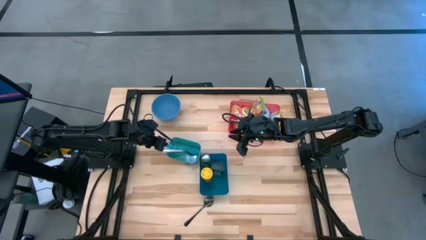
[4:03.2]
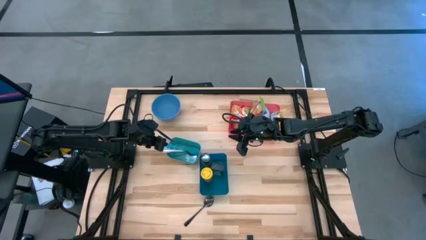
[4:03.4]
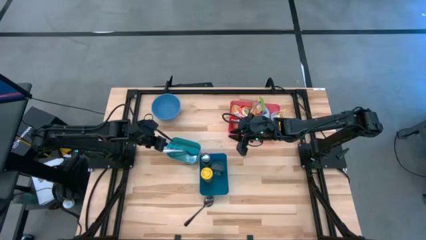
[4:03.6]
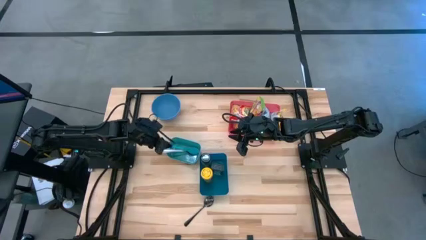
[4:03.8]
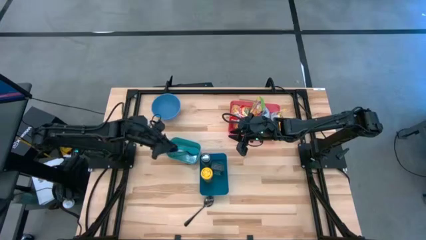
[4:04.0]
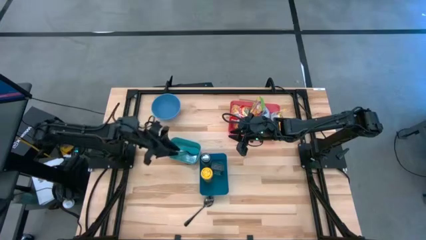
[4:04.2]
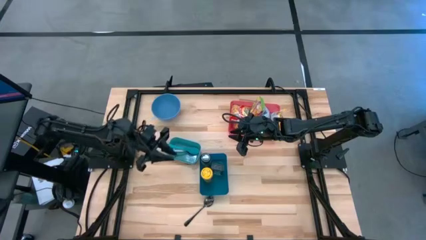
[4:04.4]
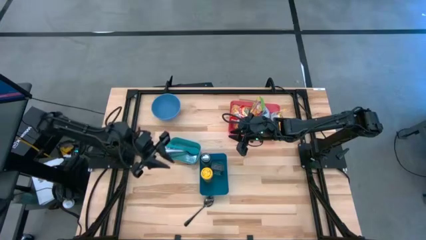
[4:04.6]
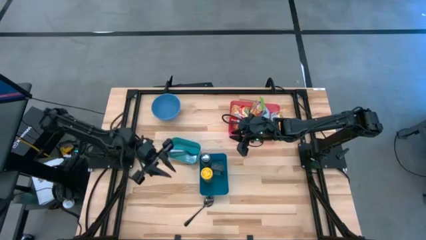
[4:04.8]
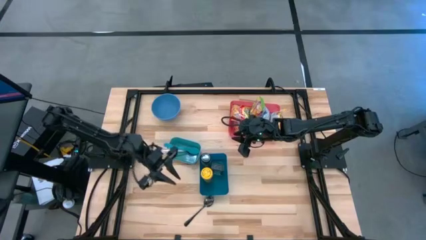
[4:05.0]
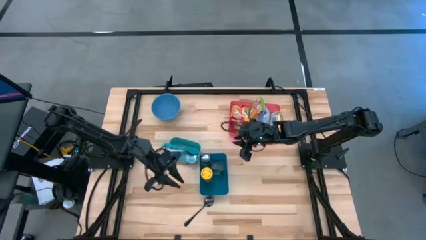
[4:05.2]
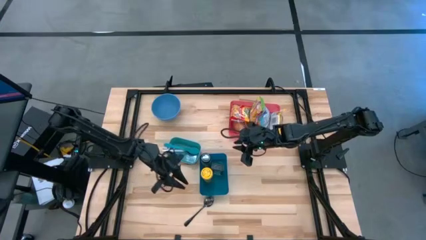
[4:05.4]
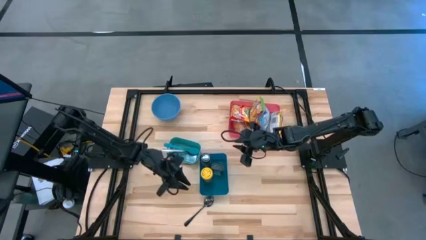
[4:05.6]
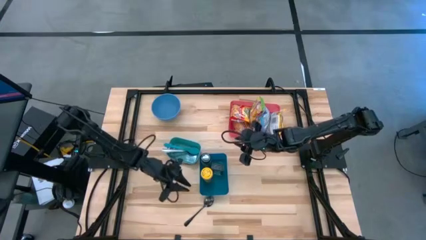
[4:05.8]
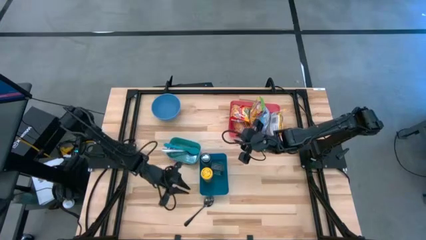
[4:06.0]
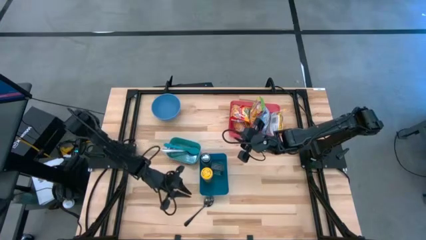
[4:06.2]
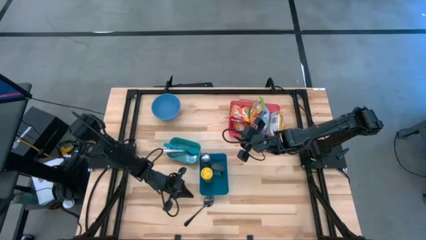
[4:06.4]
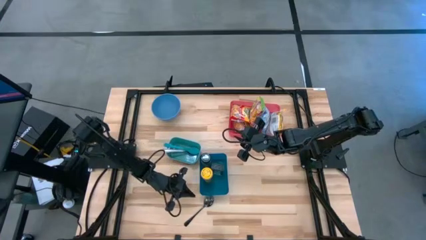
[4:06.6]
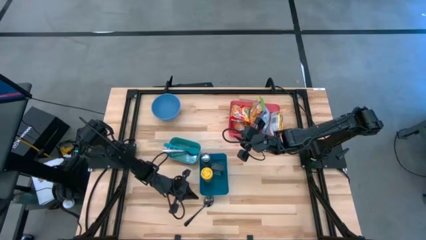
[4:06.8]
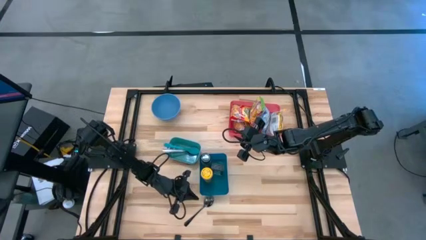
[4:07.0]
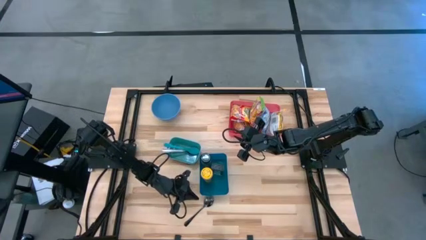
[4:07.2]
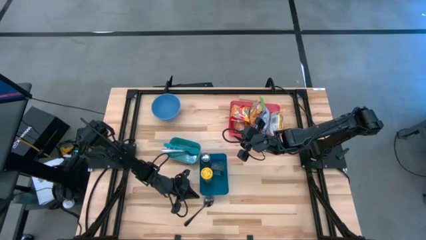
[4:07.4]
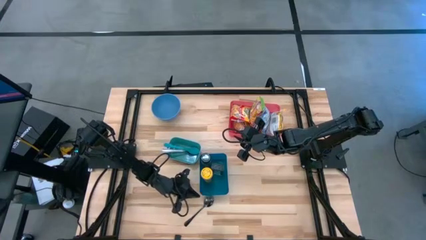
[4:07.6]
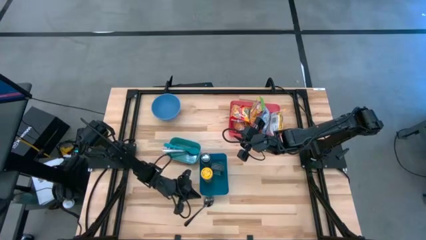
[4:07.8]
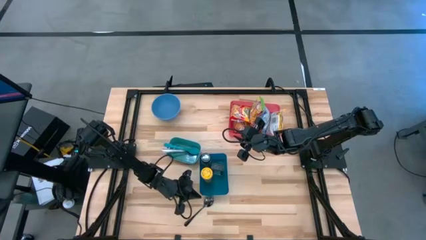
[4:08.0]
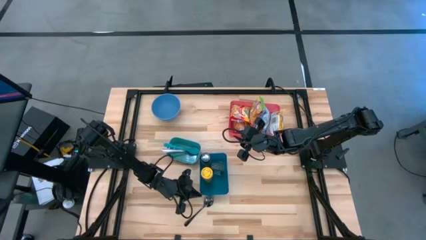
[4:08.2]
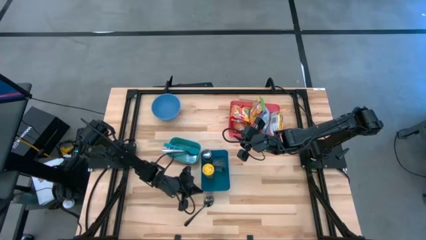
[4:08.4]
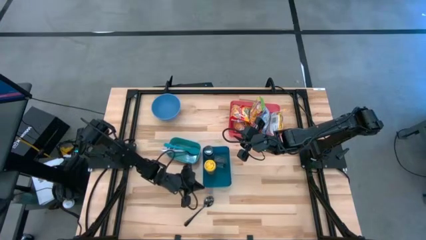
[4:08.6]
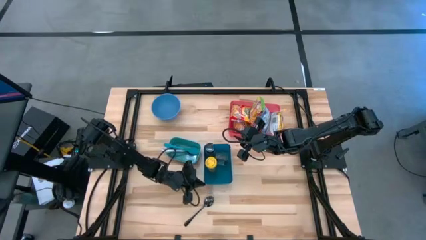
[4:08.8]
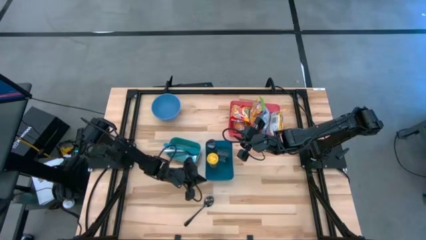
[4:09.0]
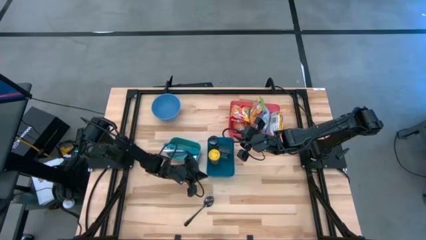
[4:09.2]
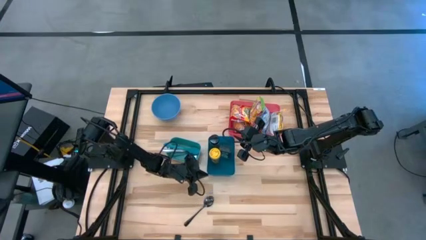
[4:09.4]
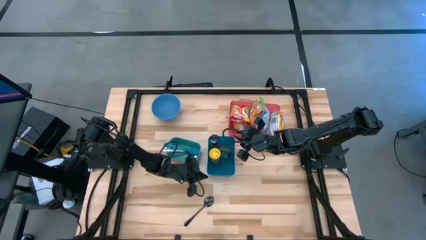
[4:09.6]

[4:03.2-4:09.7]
Task: Pick & Place Food Item
Adjust the blue bin

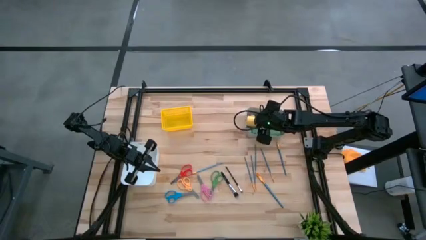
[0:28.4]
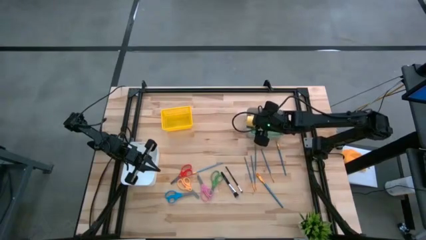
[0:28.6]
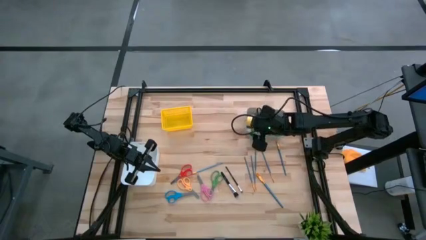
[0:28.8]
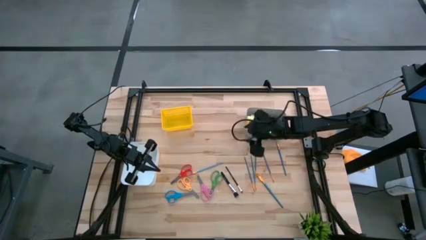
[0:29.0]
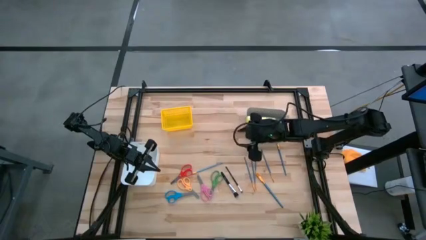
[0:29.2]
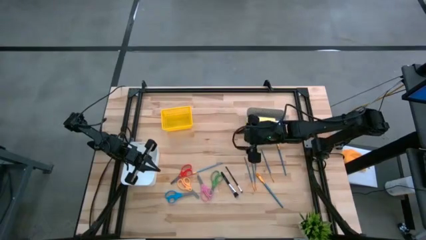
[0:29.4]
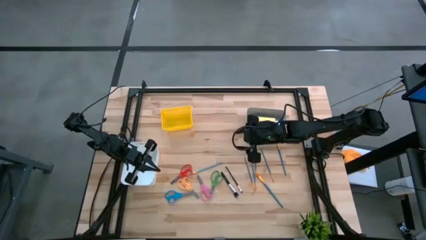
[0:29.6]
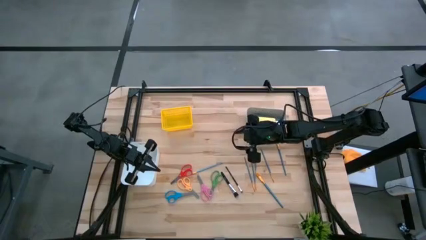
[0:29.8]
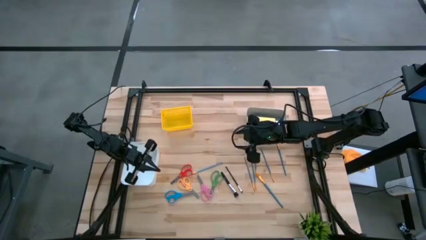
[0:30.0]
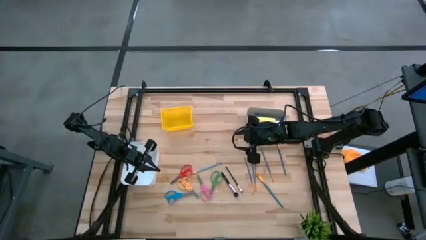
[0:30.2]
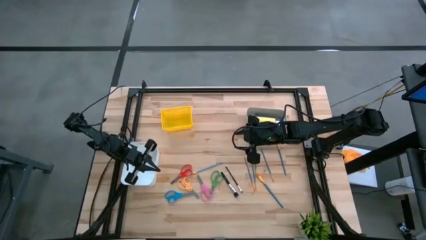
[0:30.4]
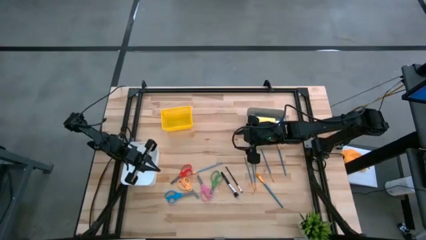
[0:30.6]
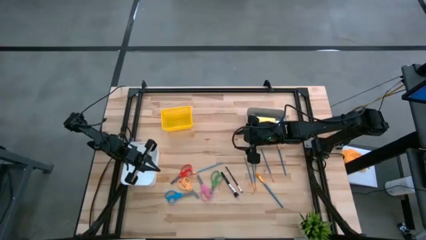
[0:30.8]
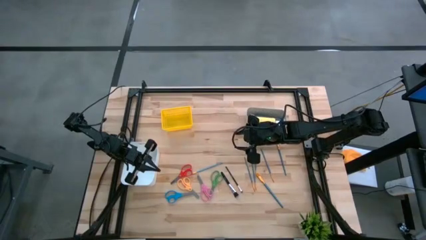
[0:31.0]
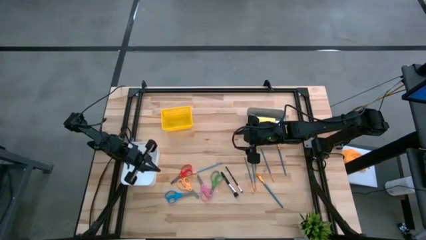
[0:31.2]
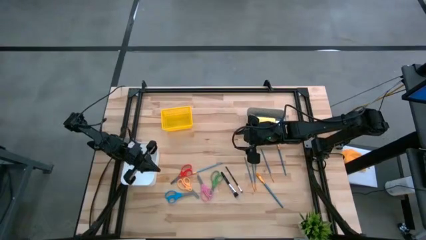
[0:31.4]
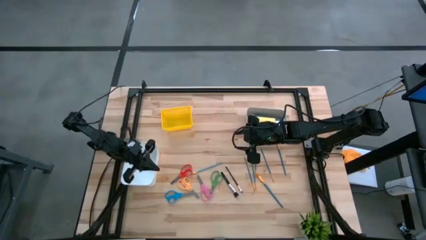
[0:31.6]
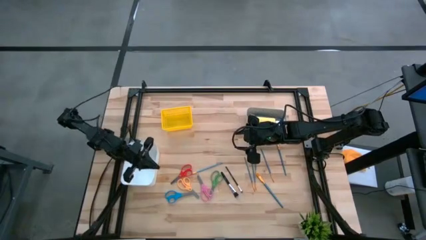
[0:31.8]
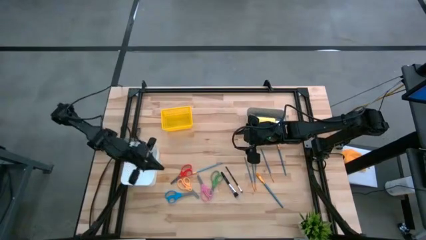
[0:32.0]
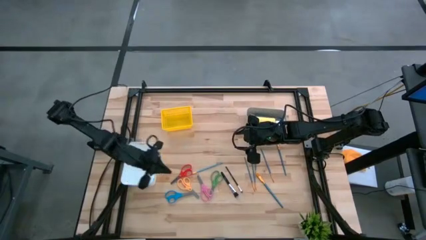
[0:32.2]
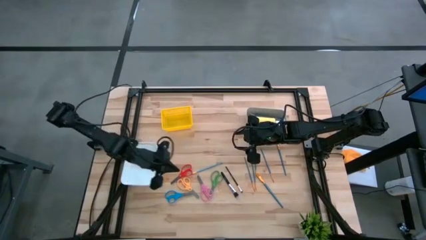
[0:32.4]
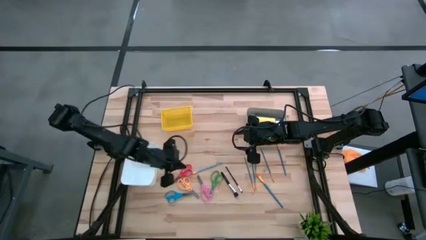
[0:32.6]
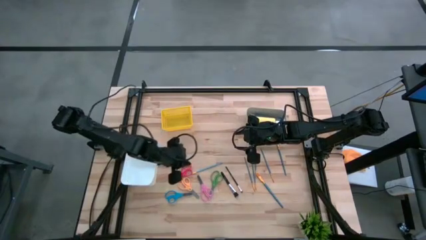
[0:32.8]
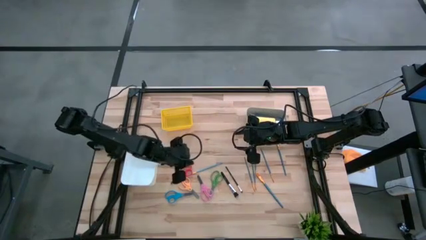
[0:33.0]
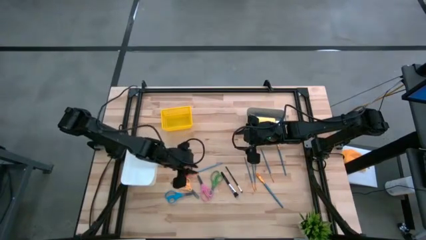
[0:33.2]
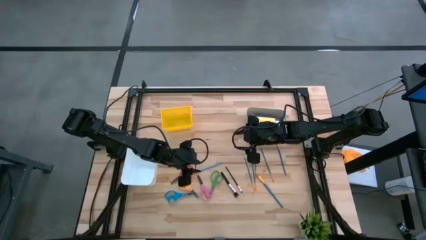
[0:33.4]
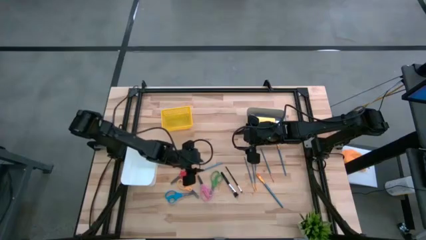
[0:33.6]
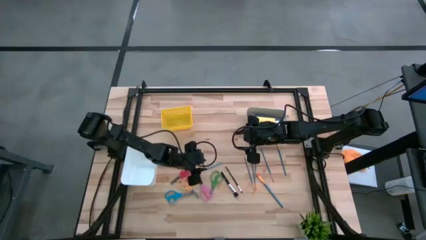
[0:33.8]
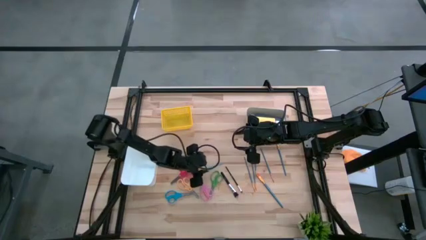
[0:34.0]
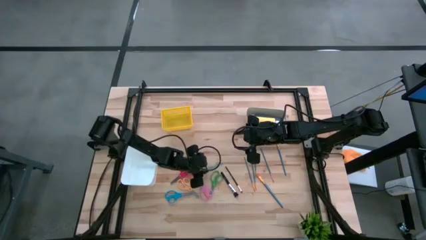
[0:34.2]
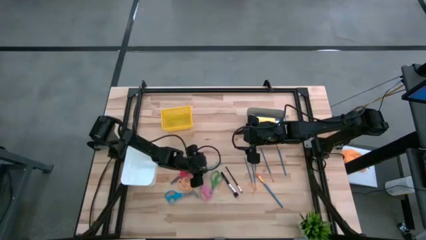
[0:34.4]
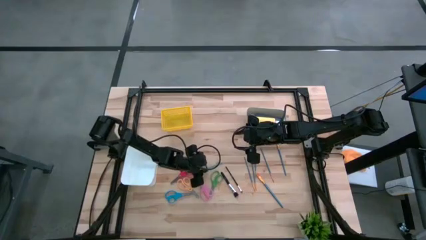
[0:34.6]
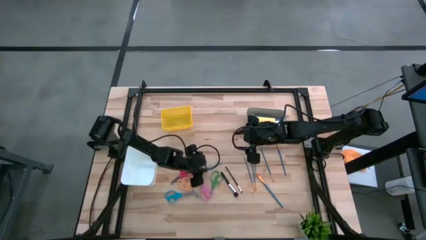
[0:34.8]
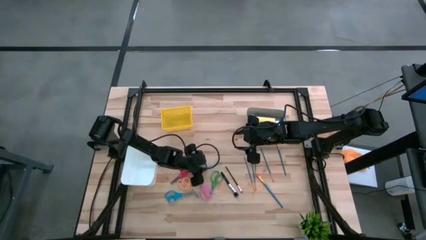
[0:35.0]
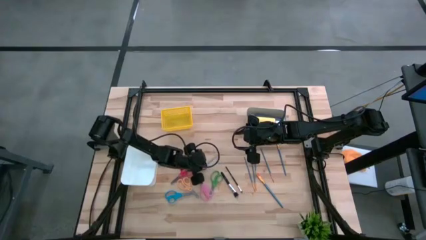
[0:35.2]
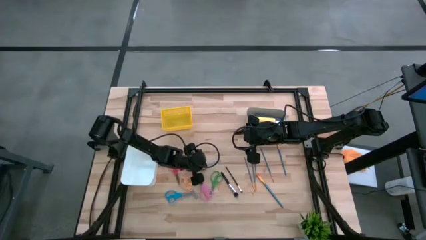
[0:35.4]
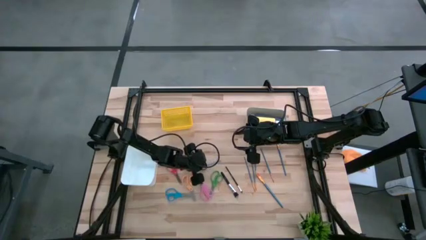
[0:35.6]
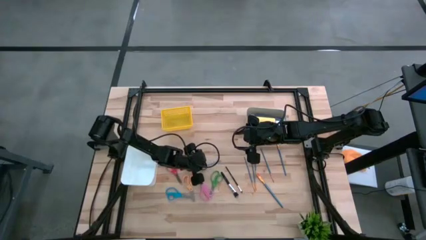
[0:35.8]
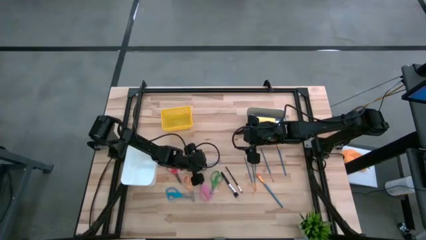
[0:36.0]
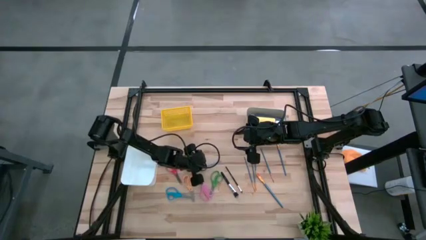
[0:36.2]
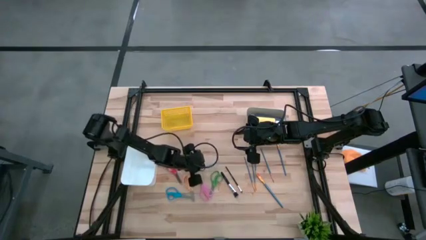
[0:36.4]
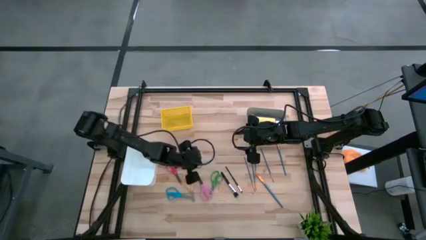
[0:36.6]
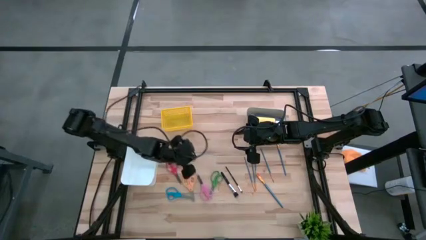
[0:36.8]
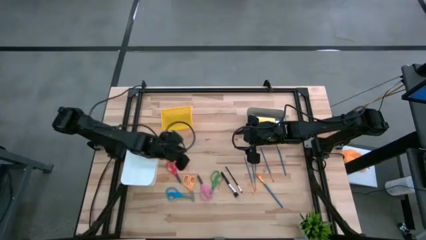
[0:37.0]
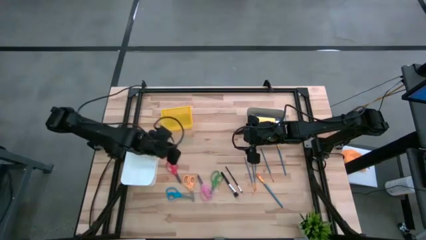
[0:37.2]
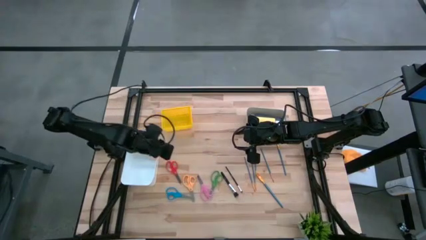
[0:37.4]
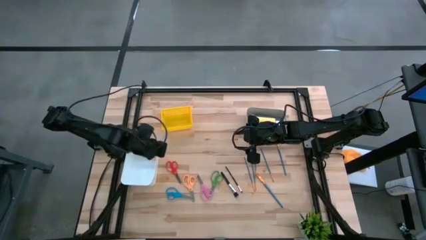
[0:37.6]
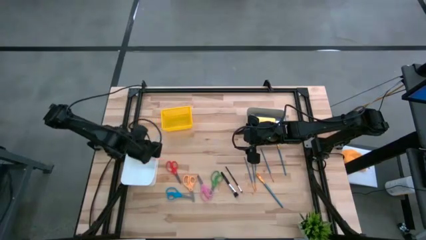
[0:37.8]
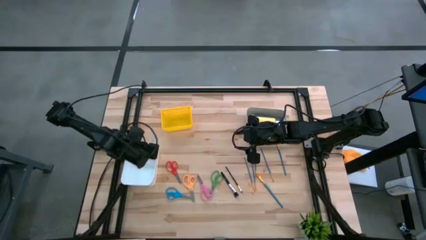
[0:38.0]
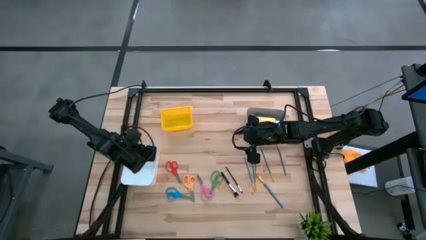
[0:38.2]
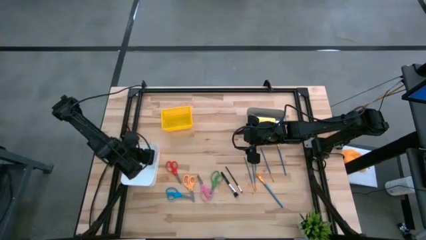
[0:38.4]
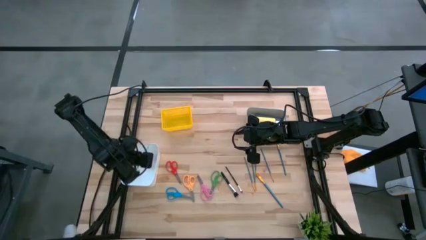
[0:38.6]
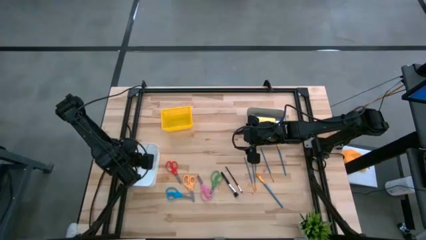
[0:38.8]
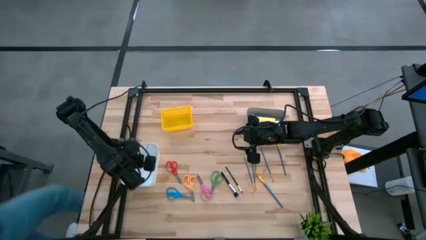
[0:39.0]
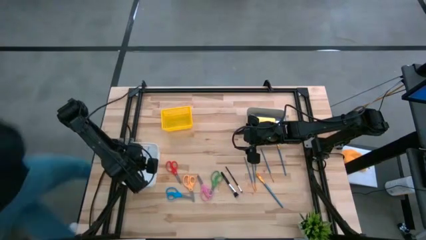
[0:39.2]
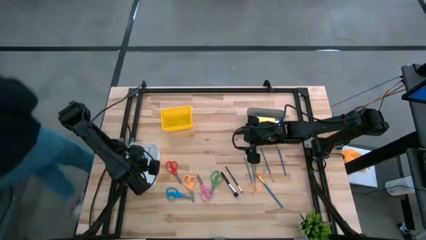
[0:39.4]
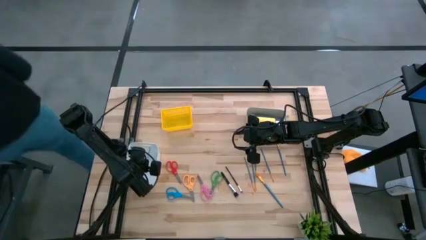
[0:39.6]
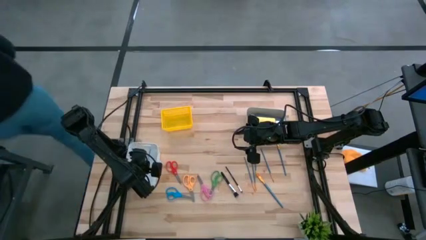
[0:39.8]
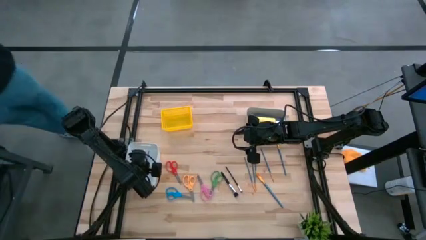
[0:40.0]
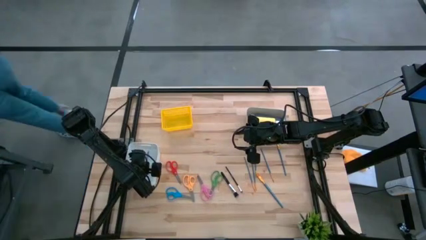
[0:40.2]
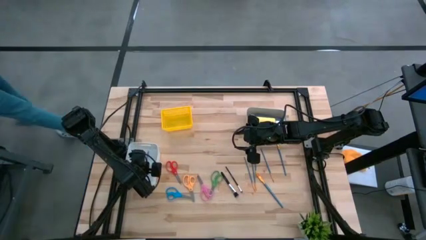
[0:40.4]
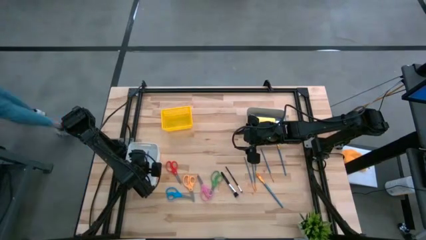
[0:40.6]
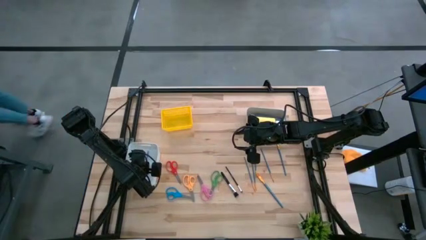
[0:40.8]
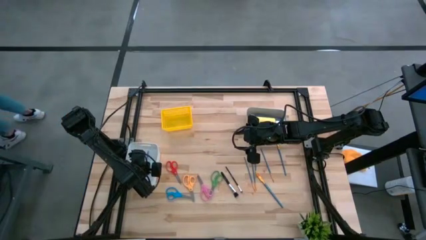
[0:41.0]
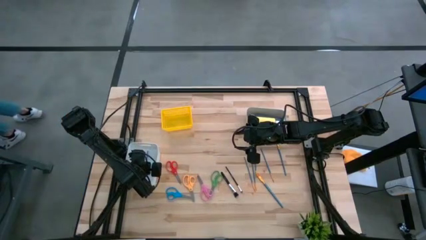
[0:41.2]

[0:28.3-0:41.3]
Task: Pick & Place Paint Supplies
Put the blue paintbrush into the white bin
